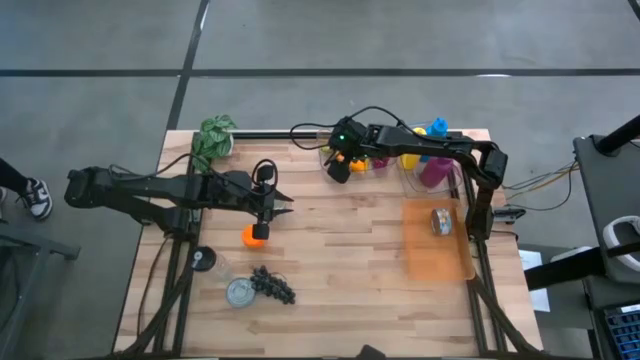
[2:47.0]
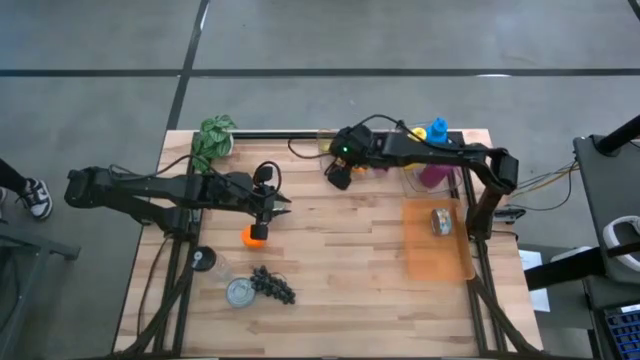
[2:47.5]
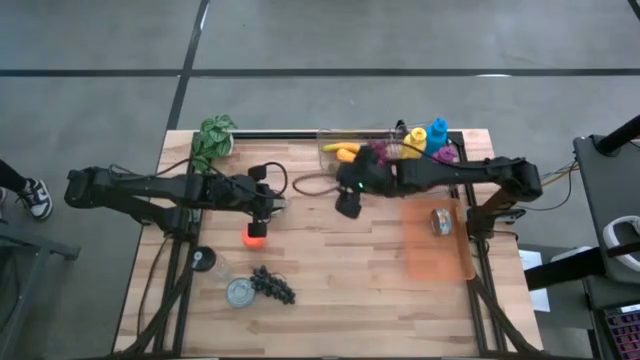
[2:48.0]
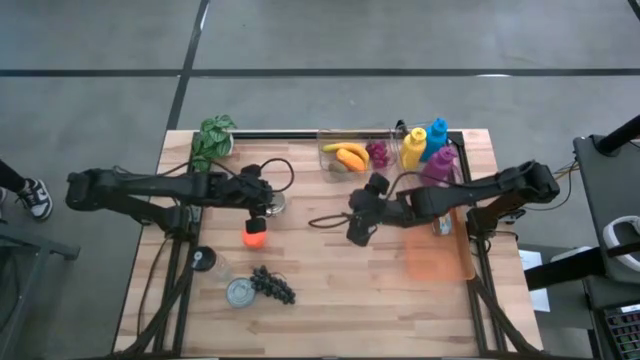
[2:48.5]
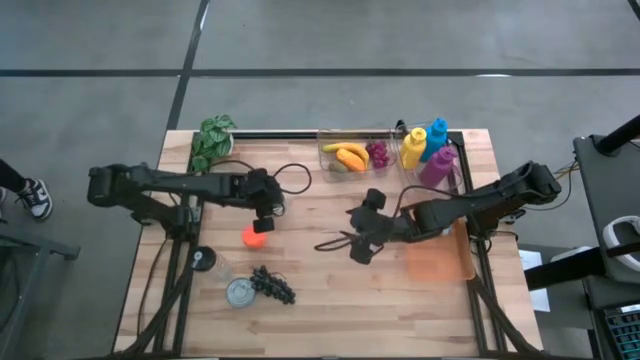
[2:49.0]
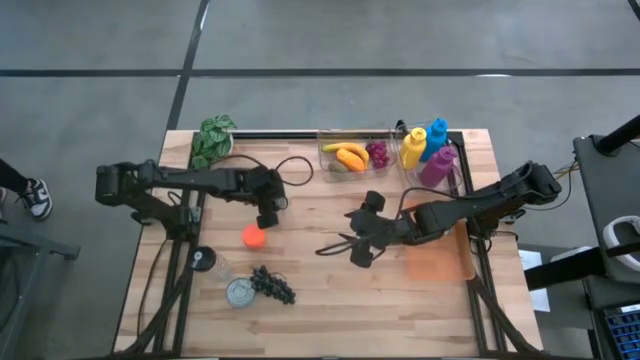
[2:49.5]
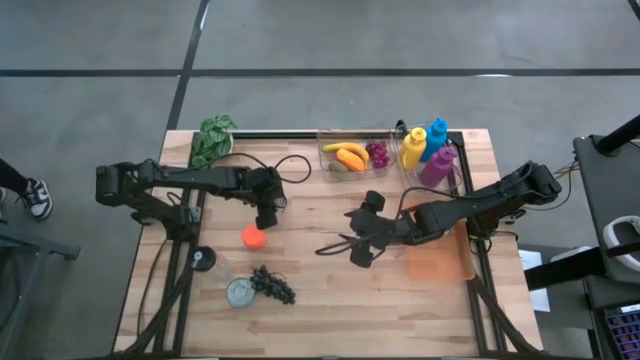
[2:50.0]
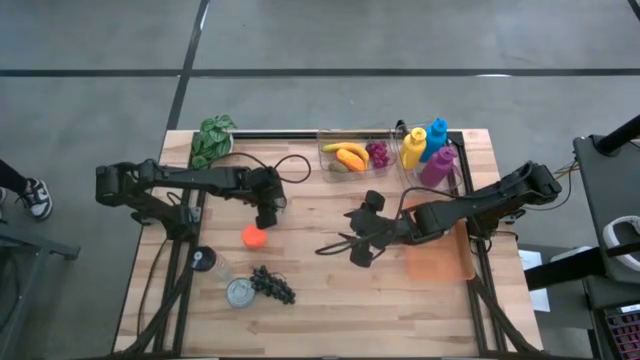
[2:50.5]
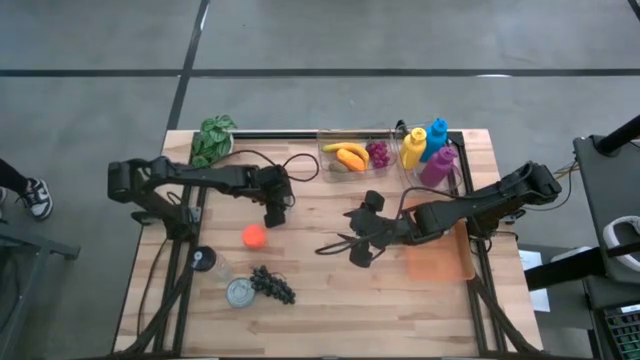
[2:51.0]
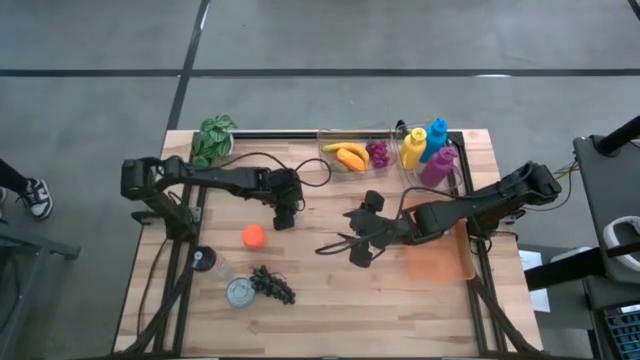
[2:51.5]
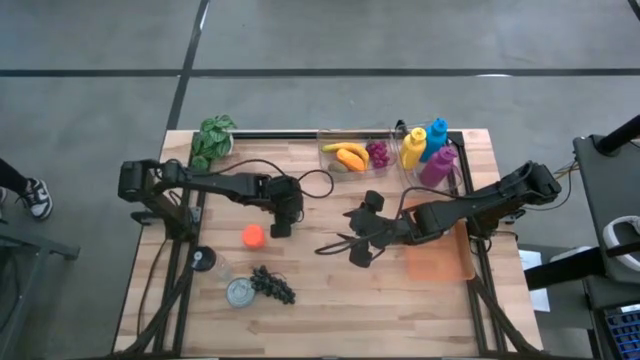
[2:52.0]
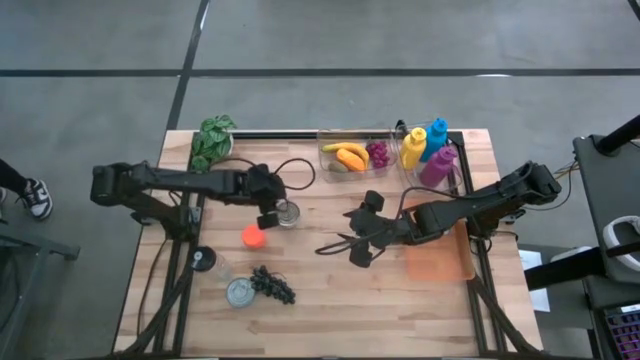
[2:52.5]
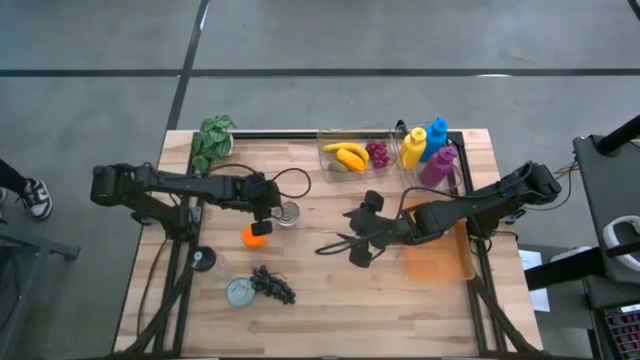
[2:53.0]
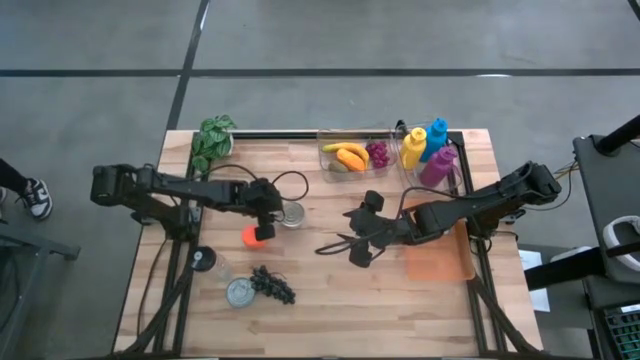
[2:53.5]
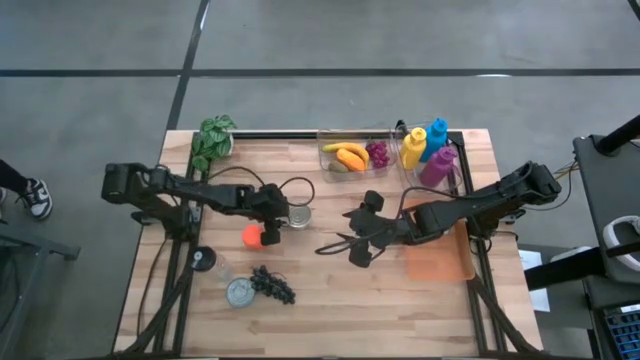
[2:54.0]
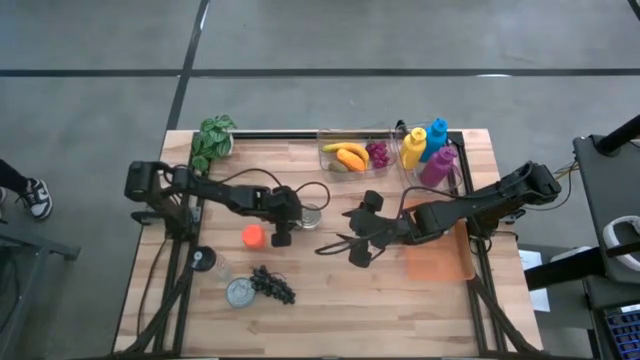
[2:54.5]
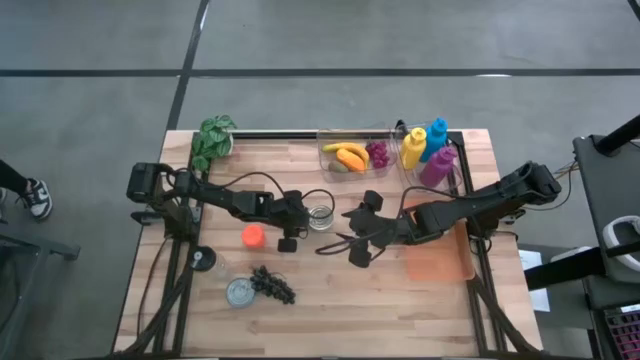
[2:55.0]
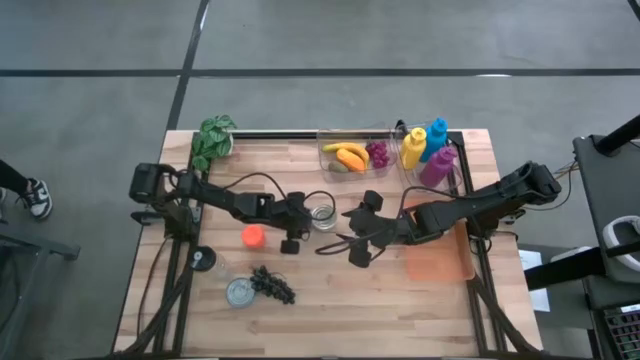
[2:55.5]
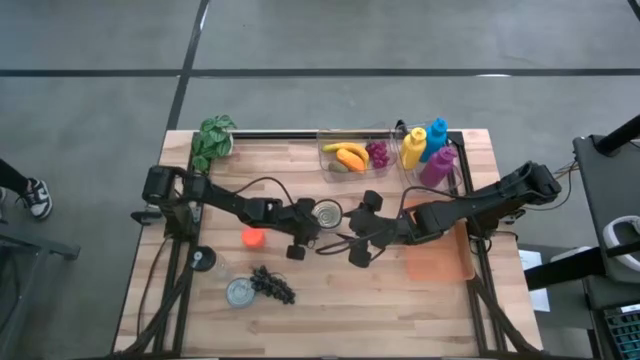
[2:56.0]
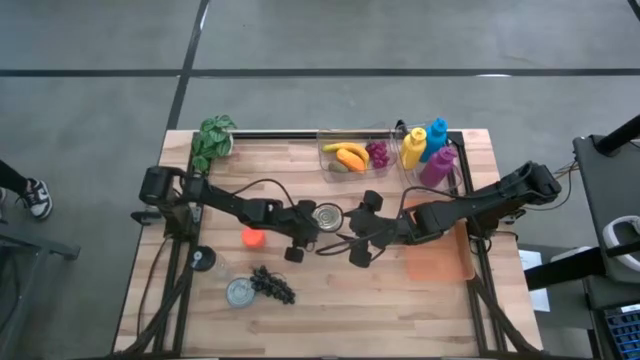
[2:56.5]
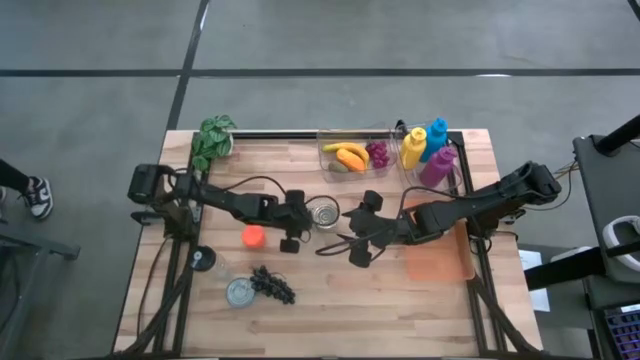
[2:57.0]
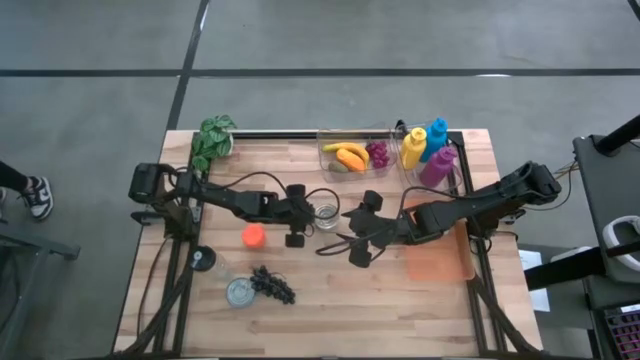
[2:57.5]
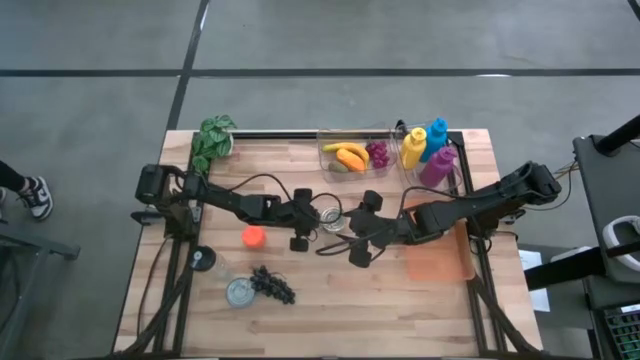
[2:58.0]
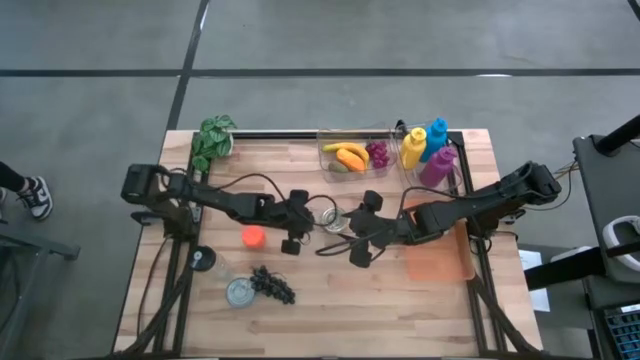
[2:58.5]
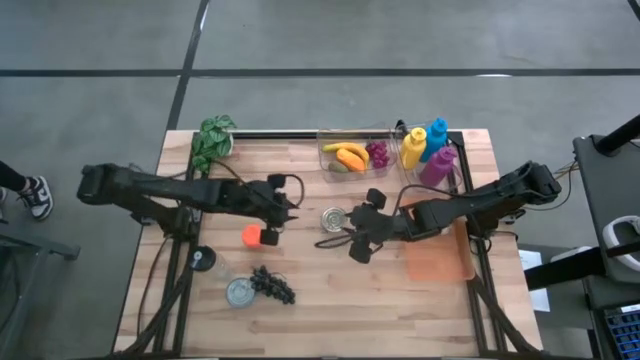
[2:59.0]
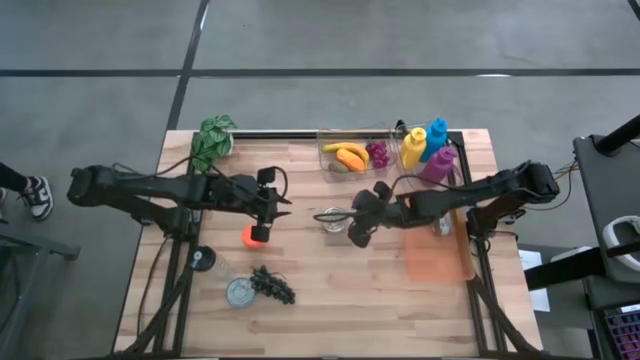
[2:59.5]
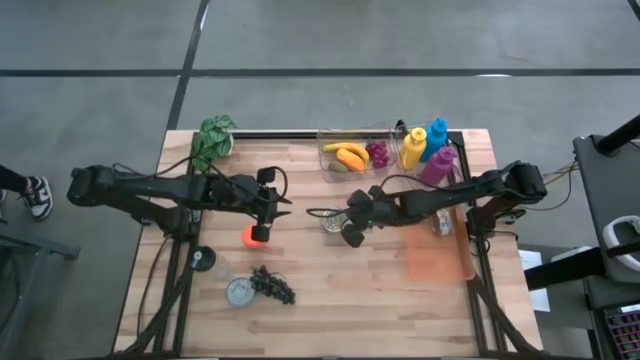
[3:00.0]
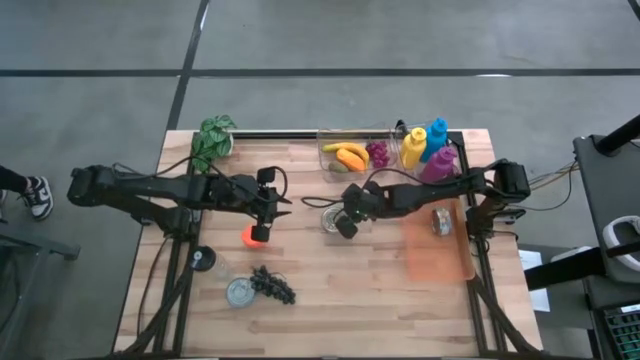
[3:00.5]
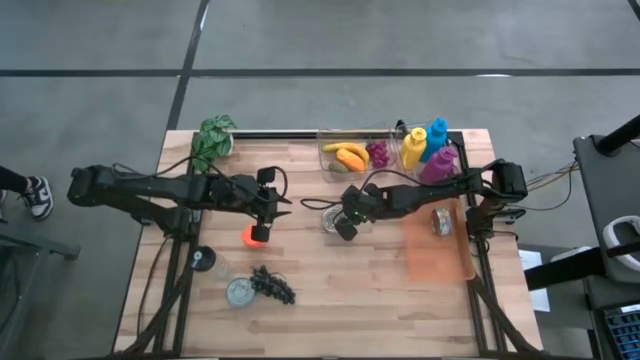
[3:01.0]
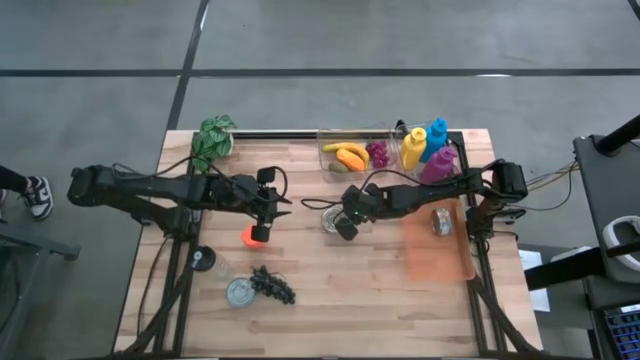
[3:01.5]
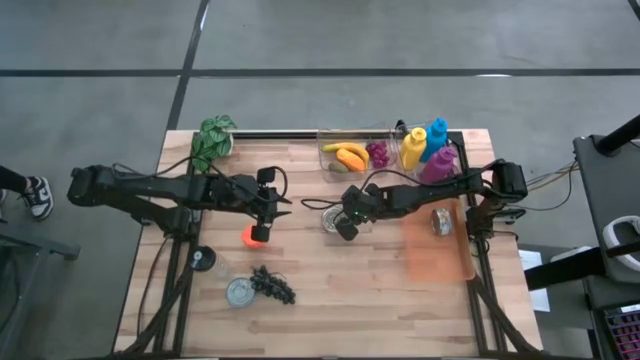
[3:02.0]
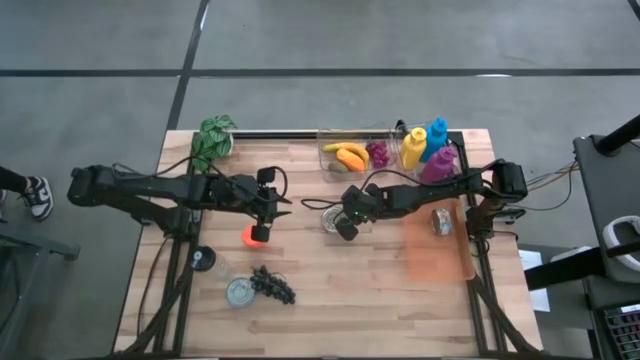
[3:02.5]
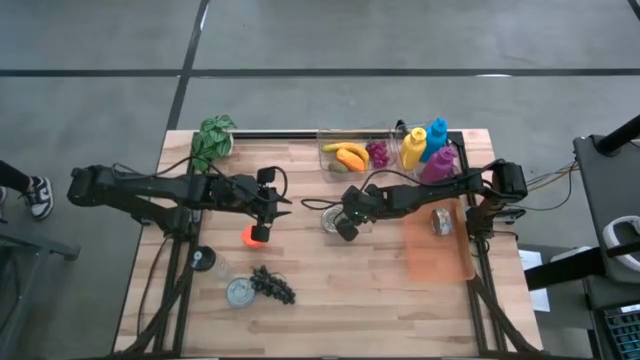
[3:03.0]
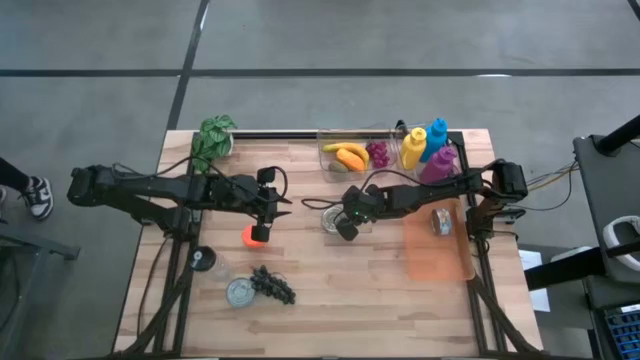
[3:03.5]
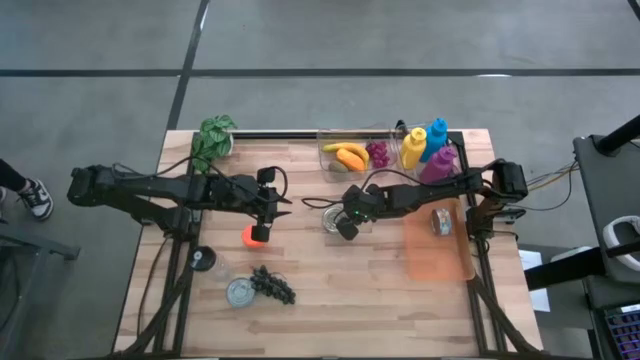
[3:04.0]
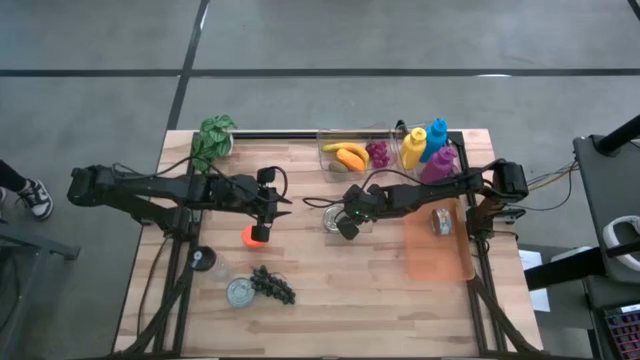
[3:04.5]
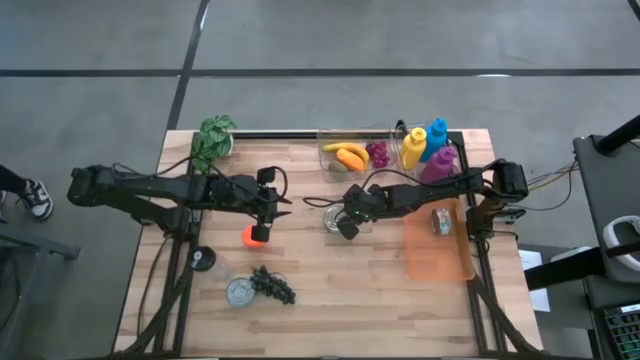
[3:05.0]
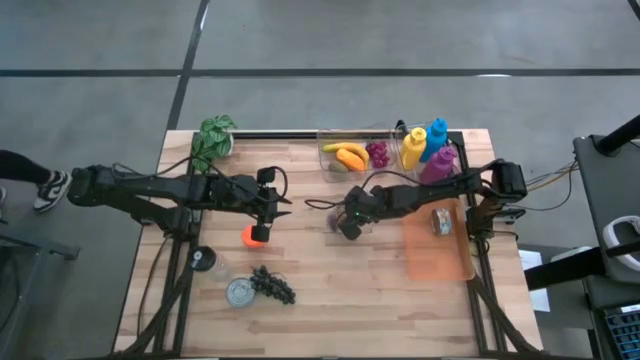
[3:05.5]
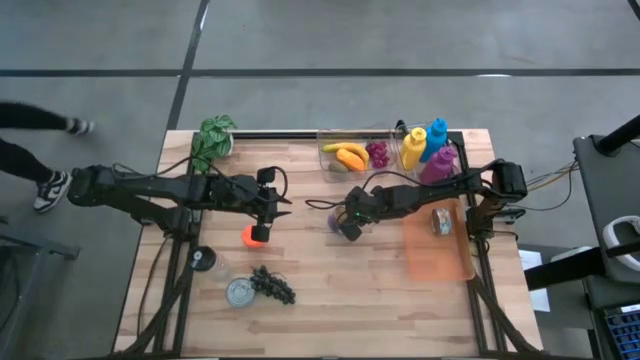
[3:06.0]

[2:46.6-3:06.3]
Task: Pick & Place Food Item
Put the blue and pink tuna can into the orange bin

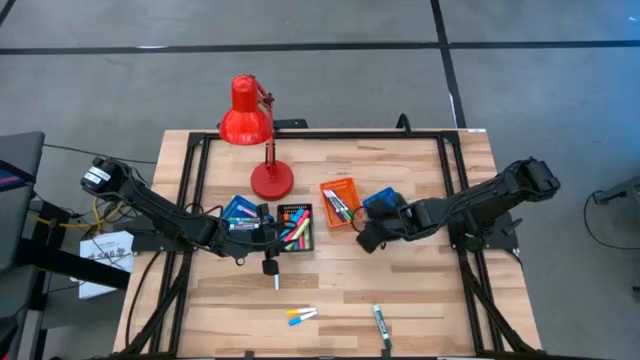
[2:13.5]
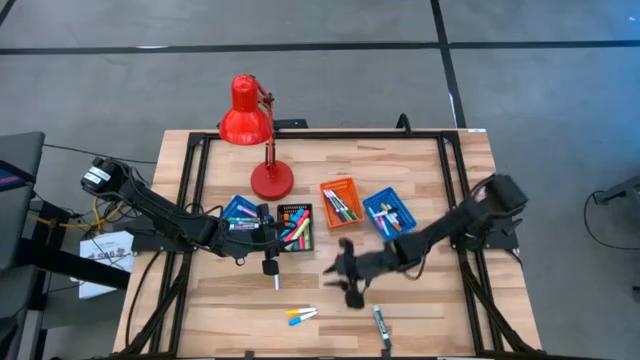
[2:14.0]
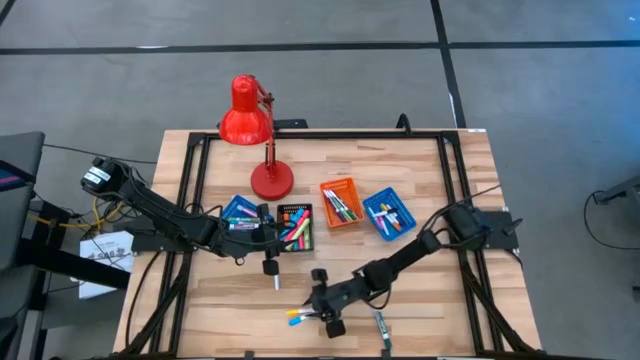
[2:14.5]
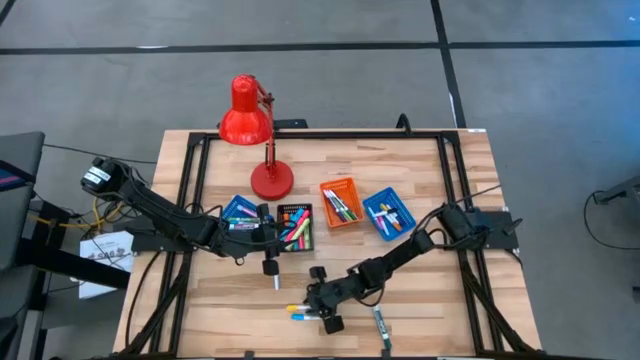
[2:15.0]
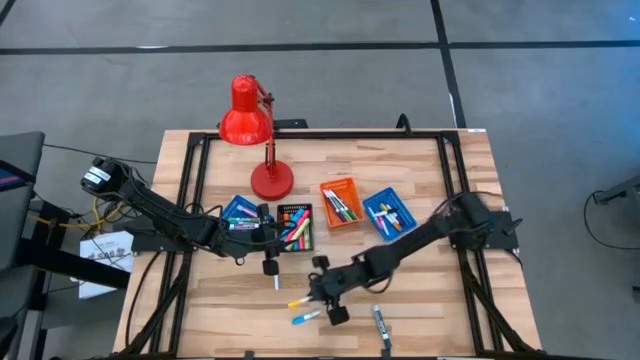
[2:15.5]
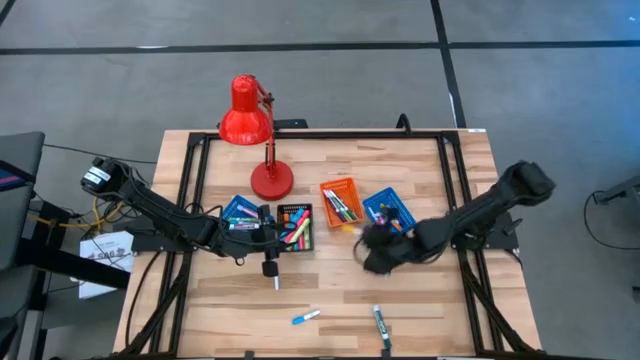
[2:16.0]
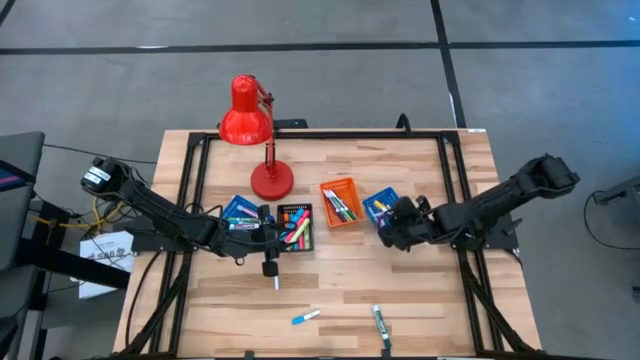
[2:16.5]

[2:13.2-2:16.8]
Task: Pick & Place Markers
Put the small white and yellow highlighter pen into the right blue basket
